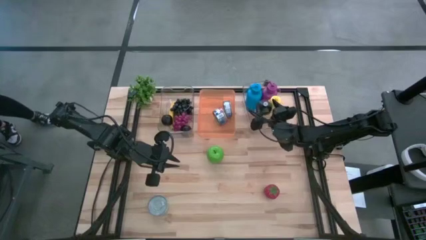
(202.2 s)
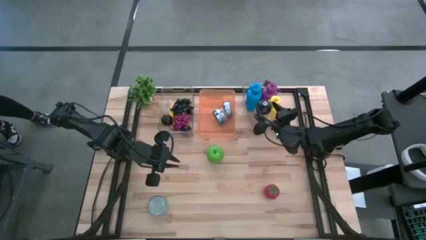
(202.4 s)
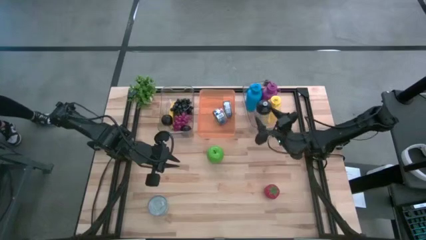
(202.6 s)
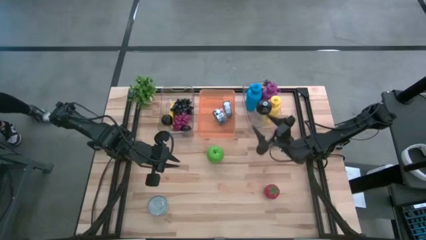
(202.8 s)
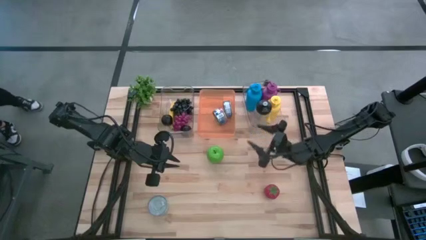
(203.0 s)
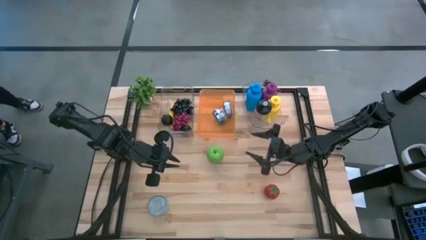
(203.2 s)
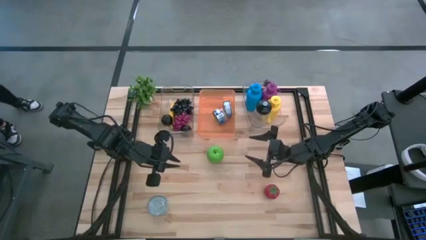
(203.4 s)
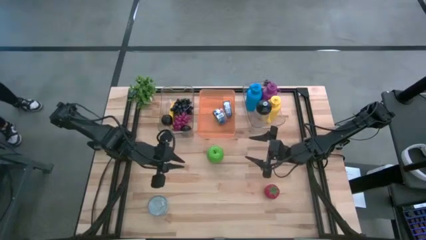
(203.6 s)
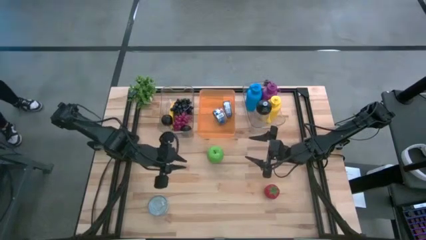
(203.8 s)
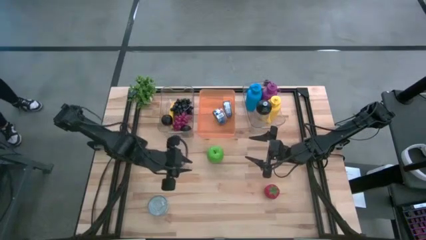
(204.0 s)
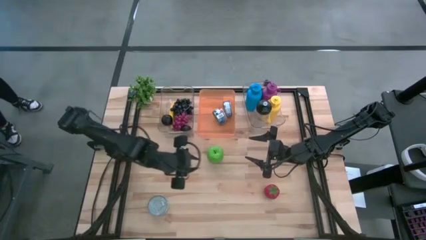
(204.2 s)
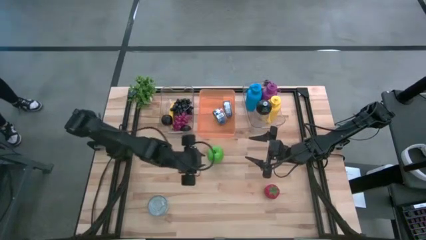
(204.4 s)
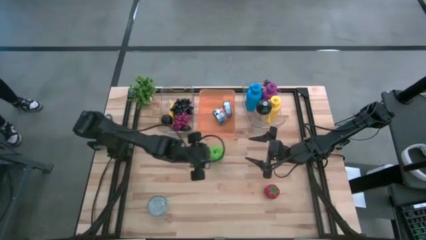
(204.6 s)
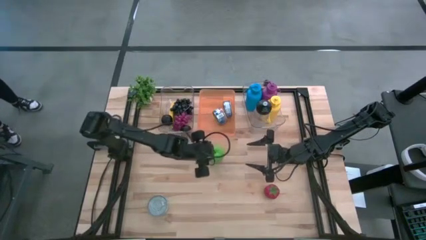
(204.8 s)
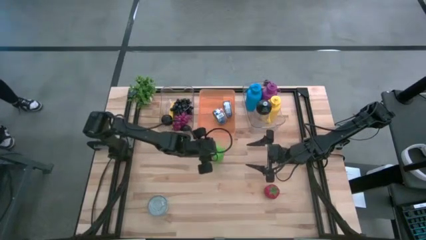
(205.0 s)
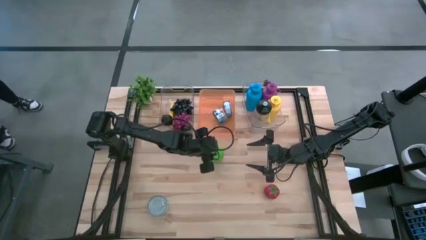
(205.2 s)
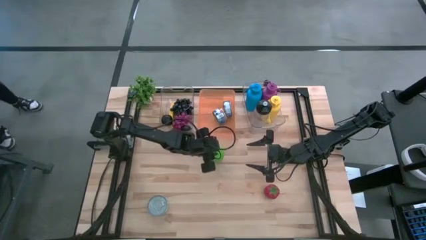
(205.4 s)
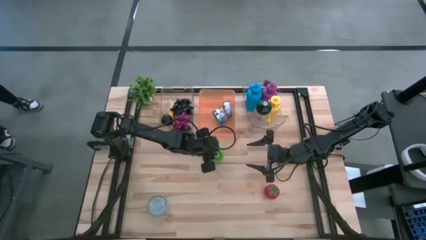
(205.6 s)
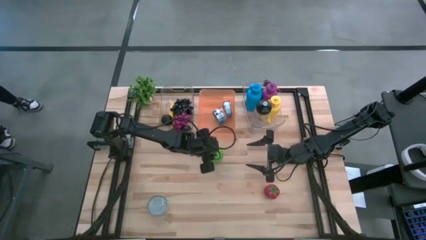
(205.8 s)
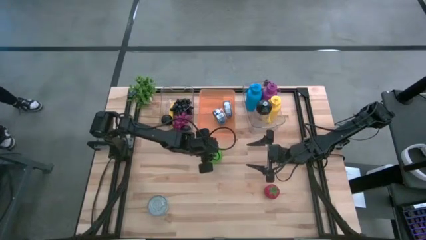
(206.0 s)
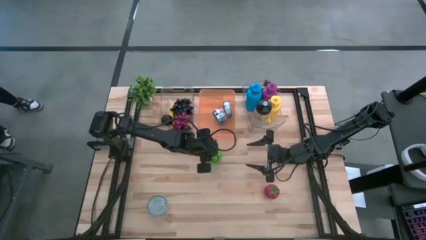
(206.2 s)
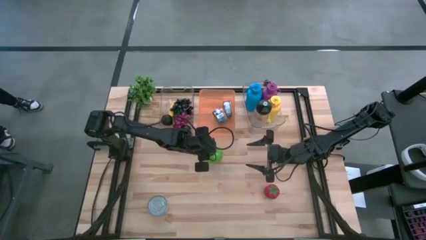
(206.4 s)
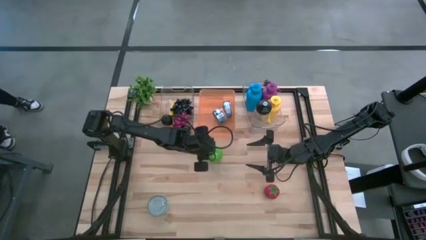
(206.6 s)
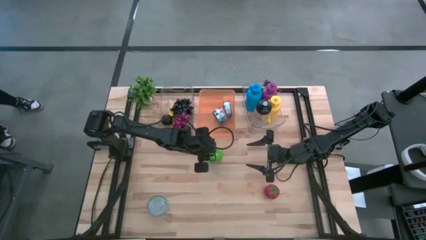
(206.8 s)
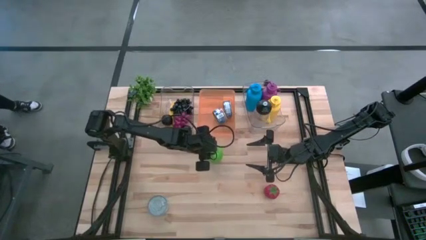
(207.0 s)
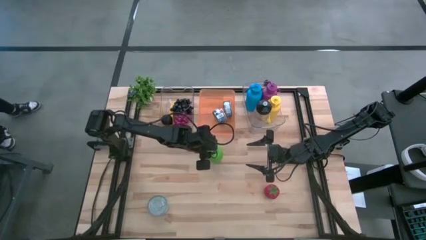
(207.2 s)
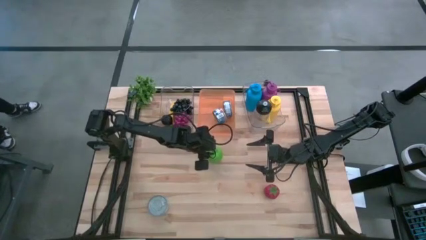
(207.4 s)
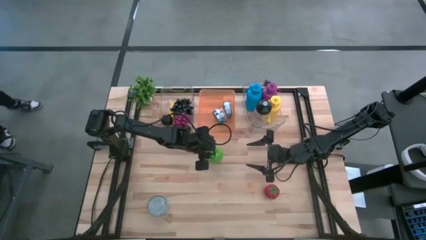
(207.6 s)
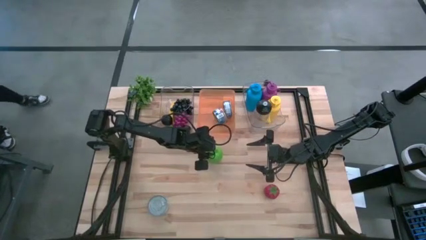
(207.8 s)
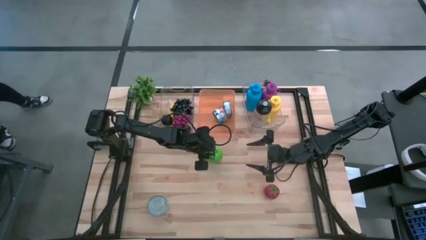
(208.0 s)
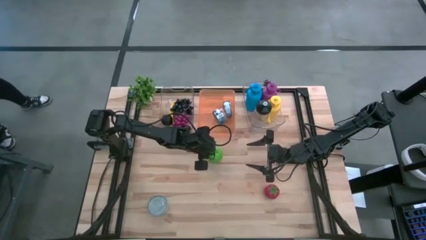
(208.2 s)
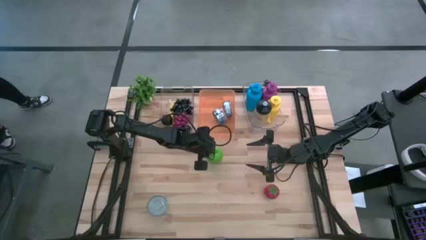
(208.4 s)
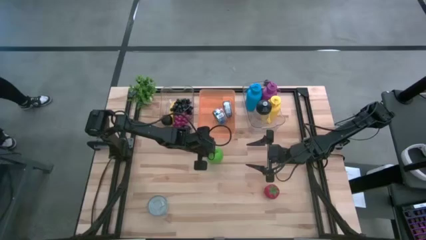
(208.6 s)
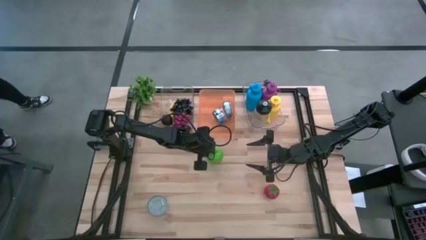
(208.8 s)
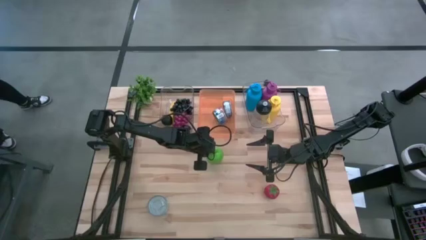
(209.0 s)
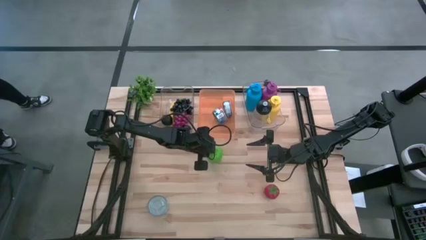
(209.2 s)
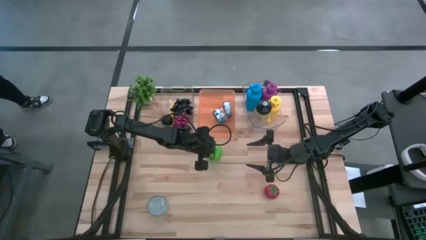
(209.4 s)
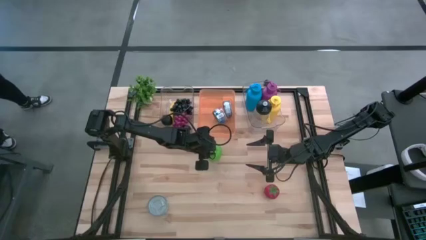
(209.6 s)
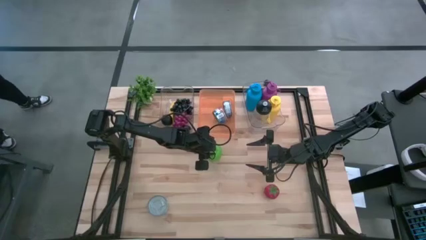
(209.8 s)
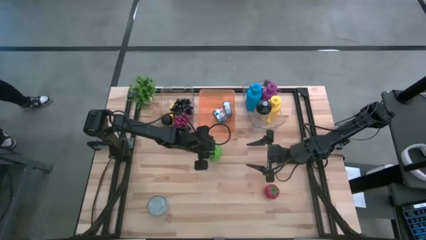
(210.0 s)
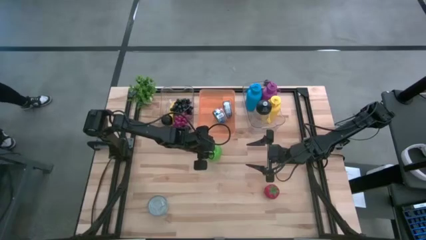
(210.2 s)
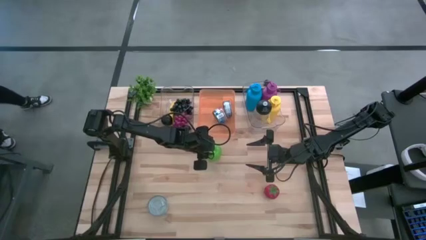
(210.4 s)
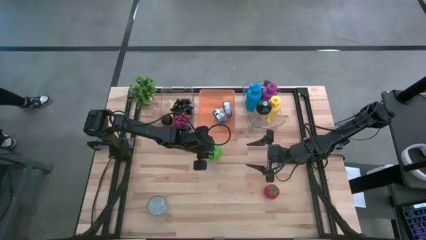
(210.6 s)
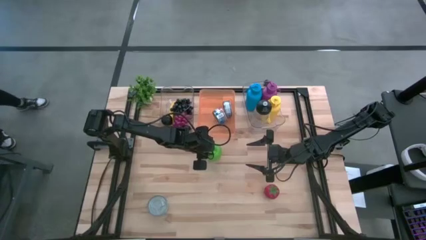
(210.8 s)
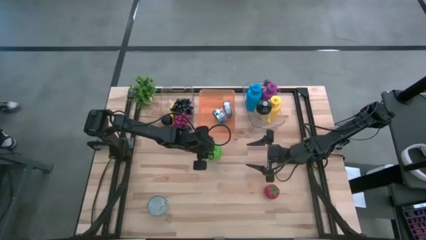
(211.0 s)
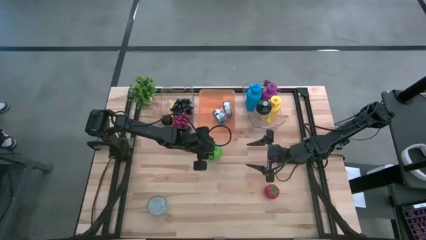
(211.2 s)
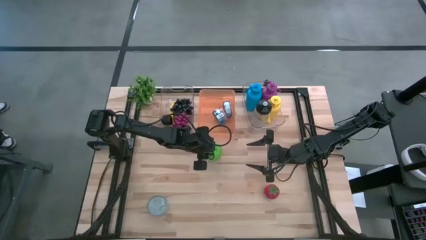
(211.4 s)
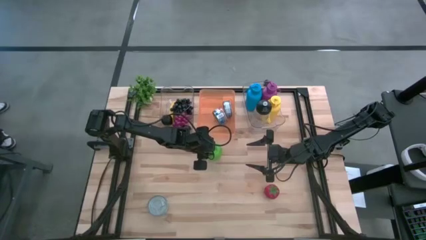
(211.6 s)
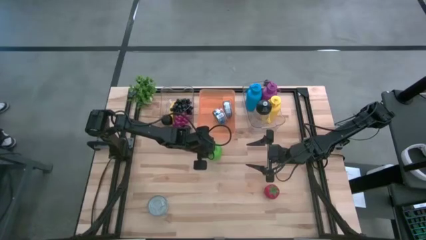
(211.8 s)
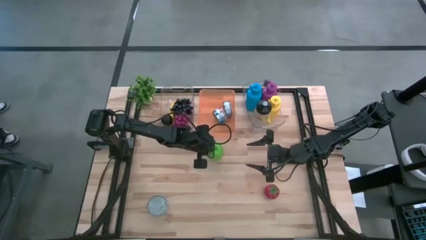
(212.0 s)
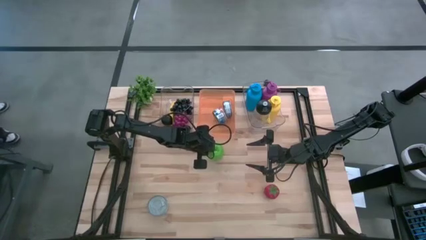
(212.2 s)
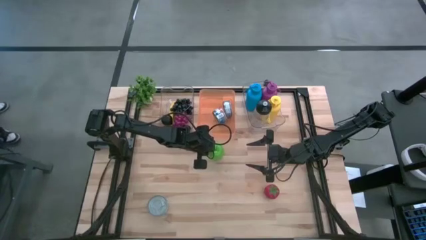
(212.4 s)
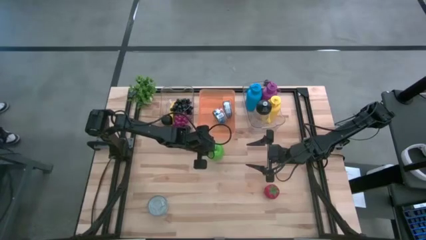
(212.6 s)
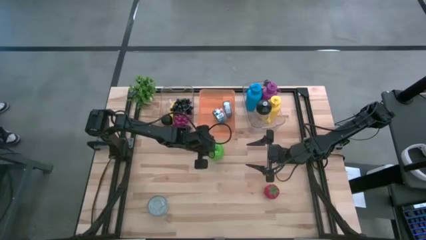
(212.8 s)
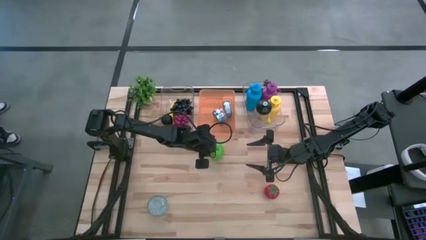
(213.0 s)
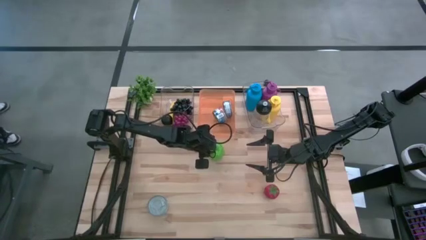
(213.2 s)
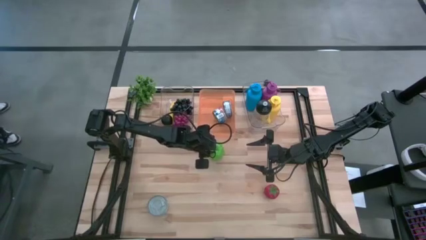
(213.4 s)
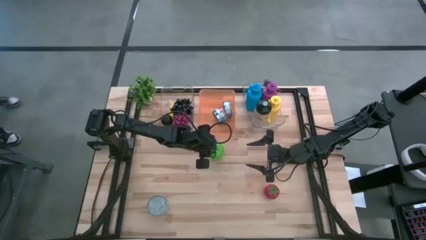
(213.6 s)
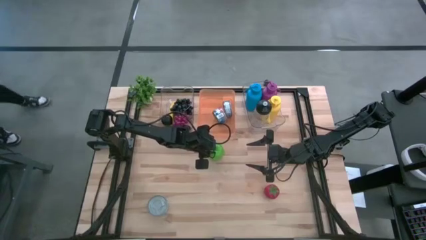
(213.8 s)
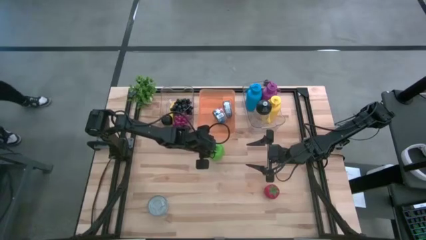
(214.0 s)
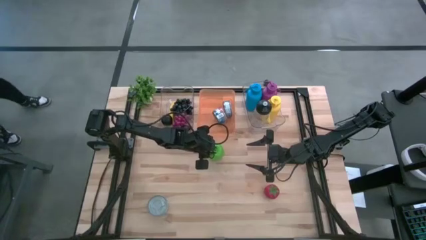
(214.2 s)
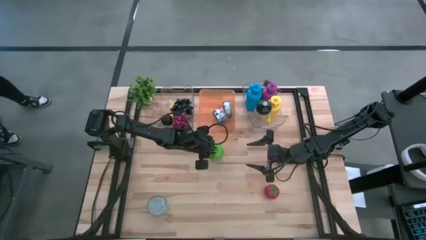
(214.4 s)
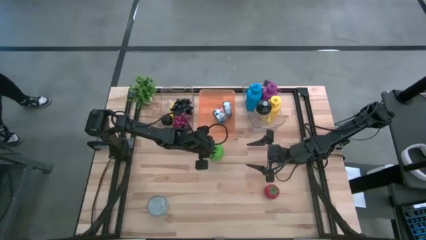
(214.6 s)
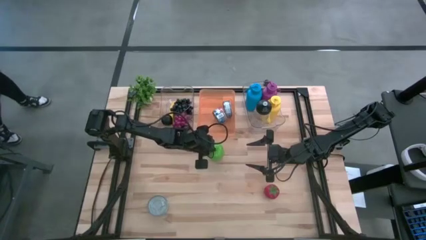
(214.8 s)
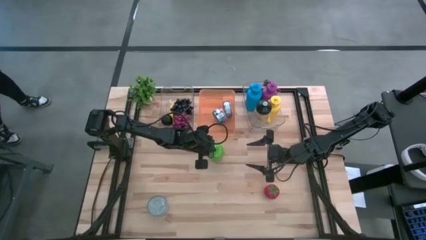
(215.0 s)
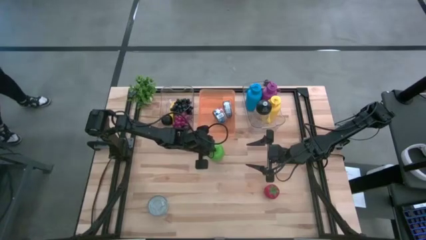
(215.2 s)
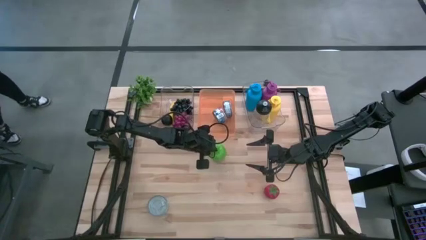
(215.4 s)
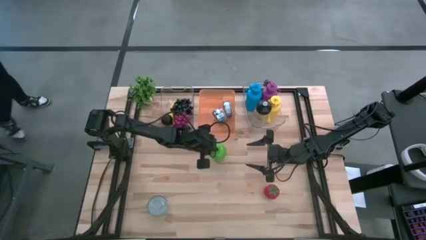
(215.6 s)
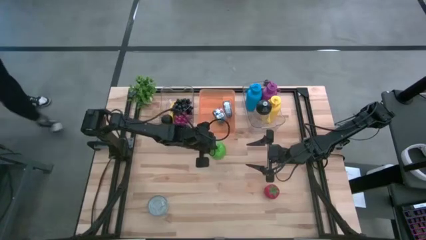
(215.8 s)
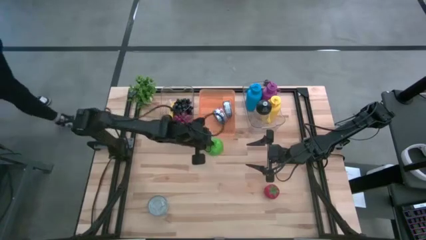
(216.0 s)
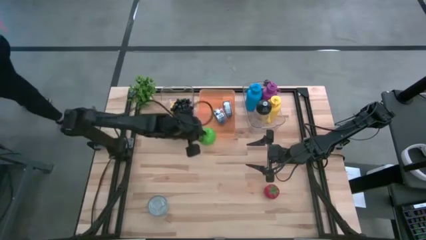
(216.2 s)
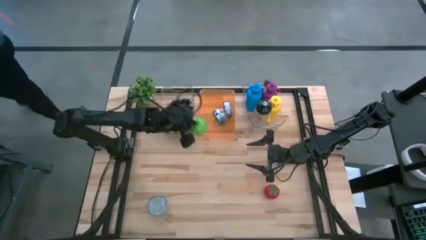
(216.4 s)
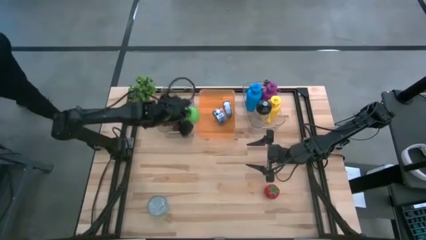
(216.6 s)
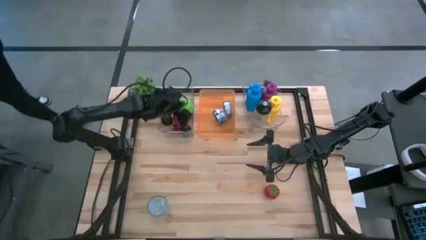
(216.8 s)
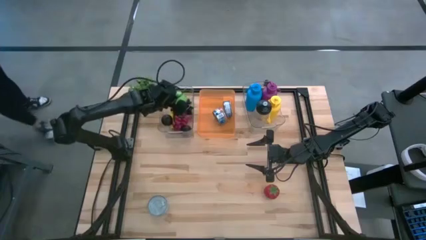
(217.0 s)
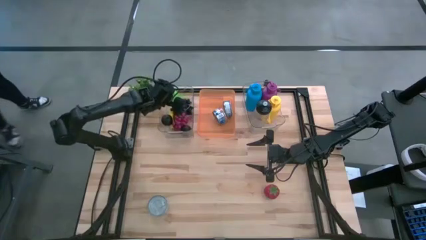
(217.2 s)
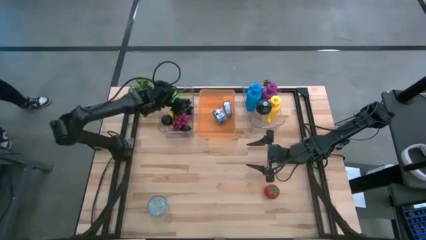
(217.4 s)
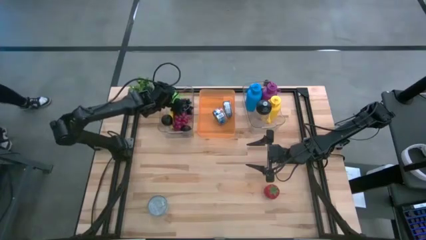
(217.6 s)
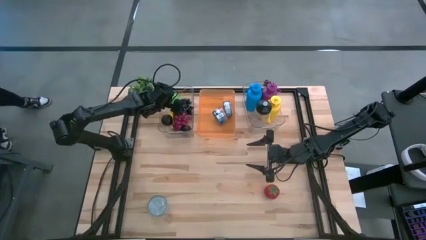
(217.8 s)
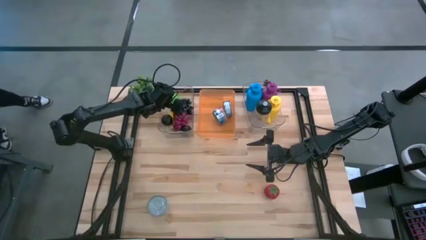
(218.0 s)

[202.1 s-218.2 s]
Task: Pick & Place Food Item
Put the green apple into the left transparent bin

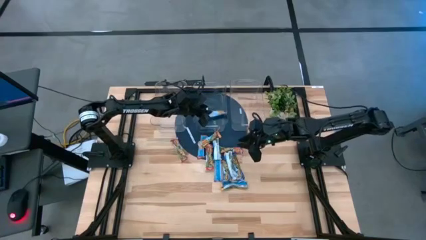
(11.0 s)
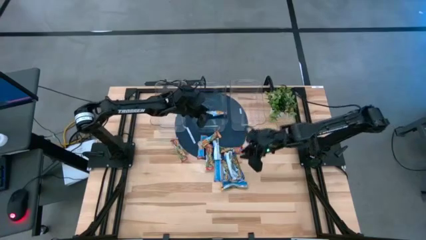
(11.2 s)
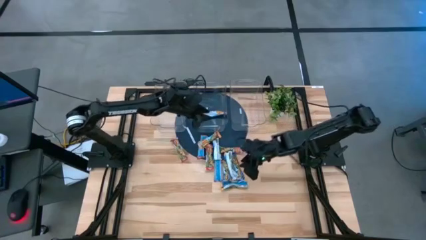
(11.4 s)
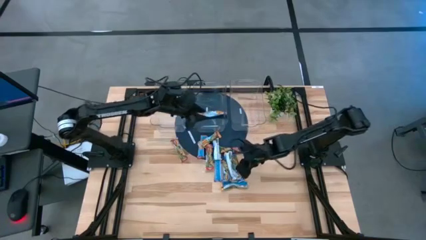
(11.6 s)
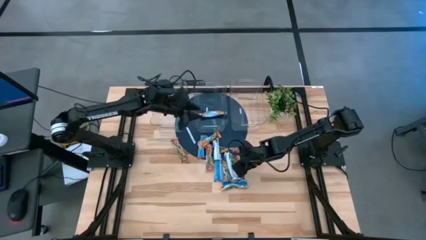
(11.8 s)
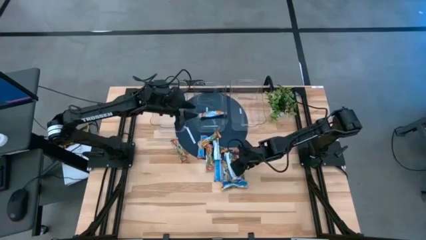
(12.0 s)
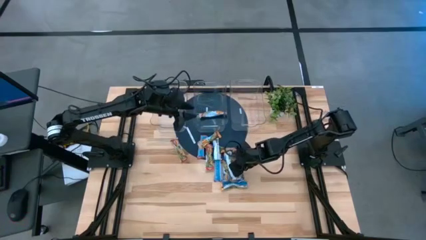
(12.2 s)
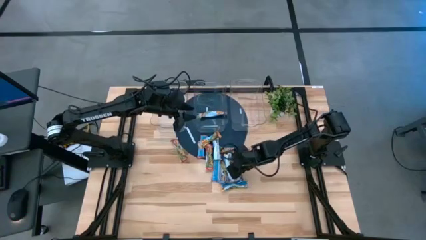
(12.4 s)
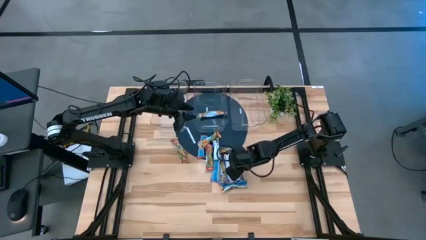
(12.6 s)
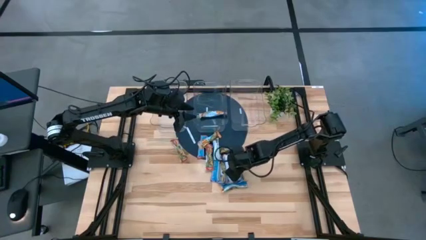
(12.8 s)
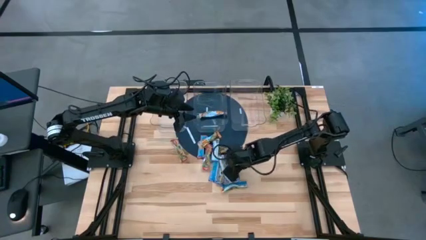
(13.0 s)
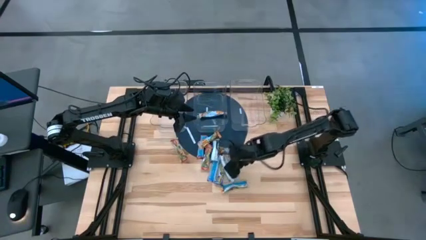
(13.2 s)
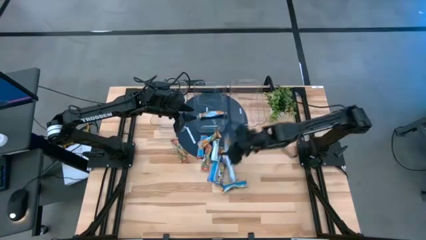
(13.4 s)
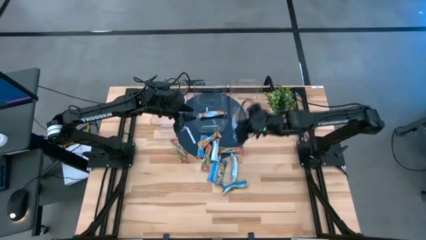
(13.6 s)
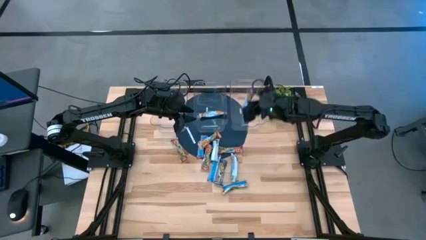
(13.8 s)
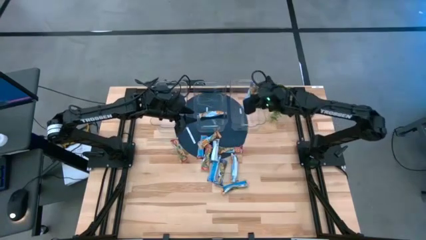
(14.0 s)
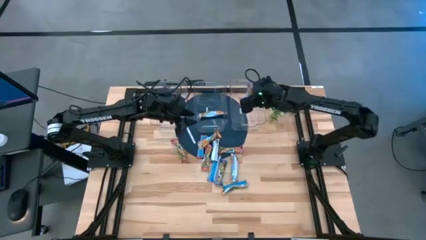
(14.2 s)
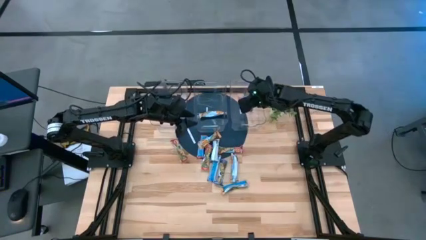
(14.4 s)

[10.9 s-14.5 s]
Task: Pick and place Granola Bars by type
Put the blue granola bar into the right transparent bin
